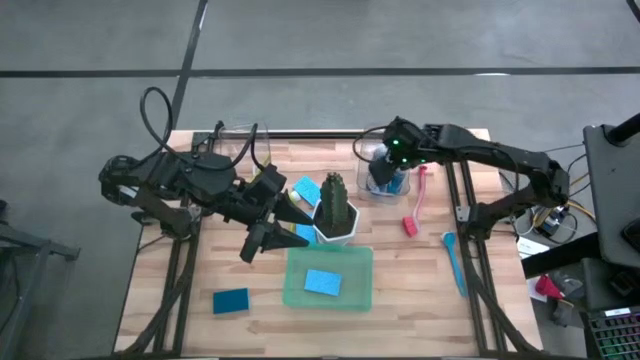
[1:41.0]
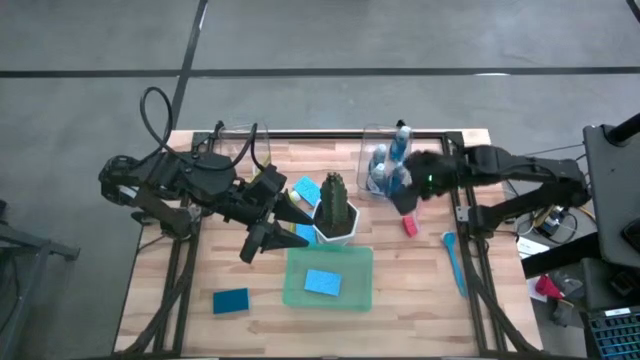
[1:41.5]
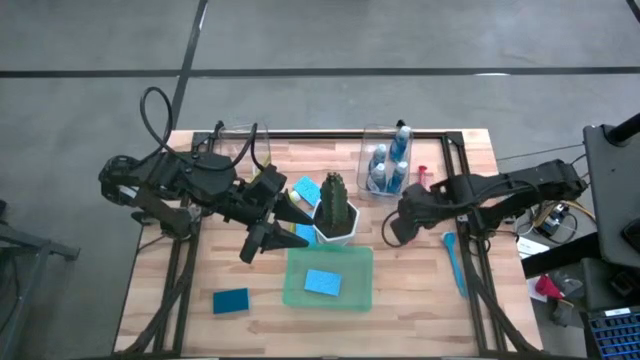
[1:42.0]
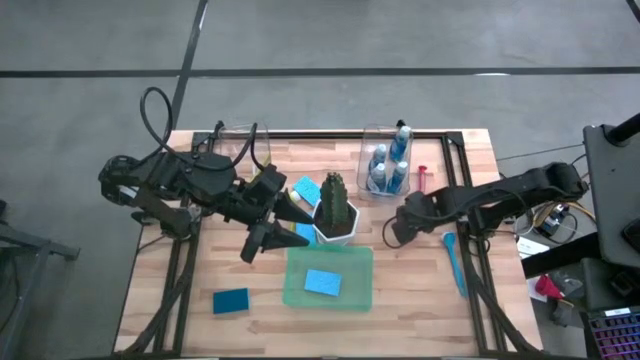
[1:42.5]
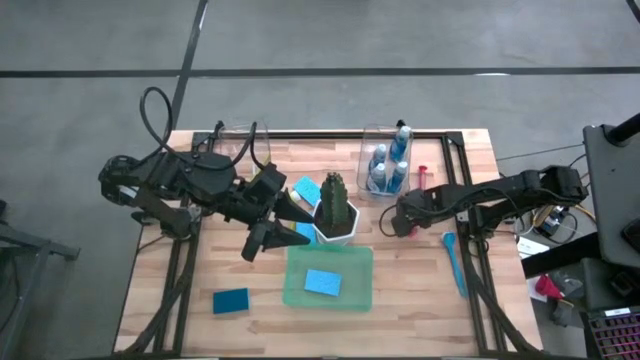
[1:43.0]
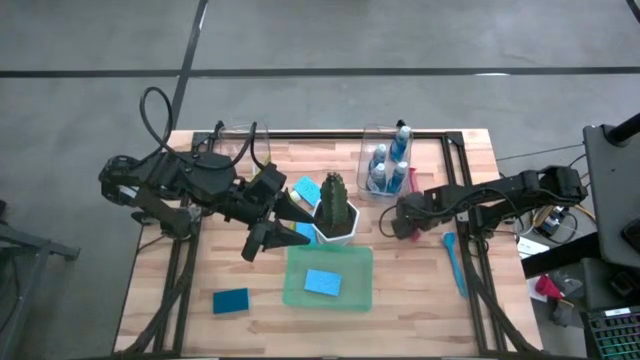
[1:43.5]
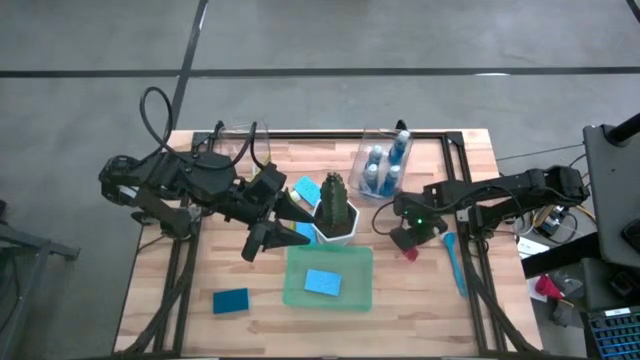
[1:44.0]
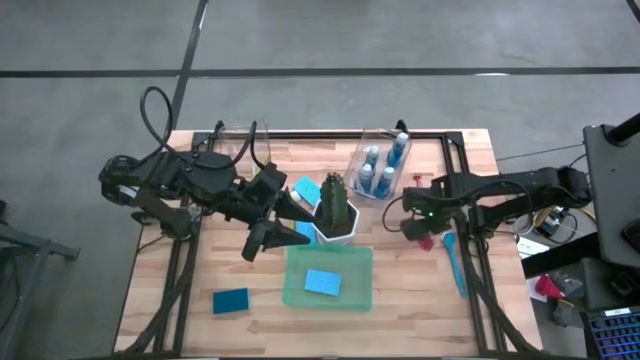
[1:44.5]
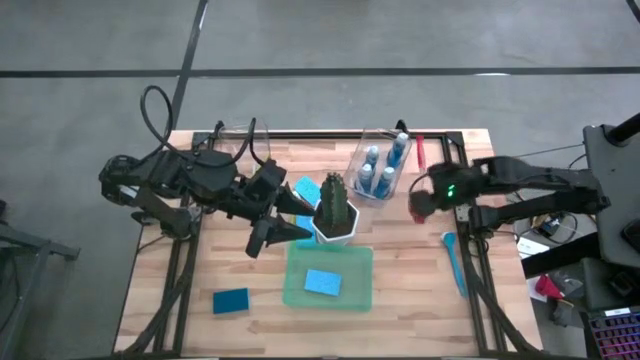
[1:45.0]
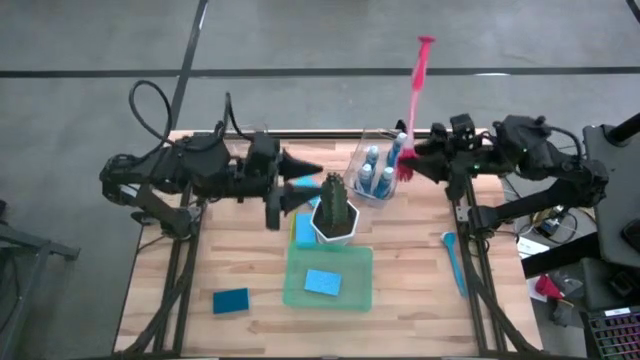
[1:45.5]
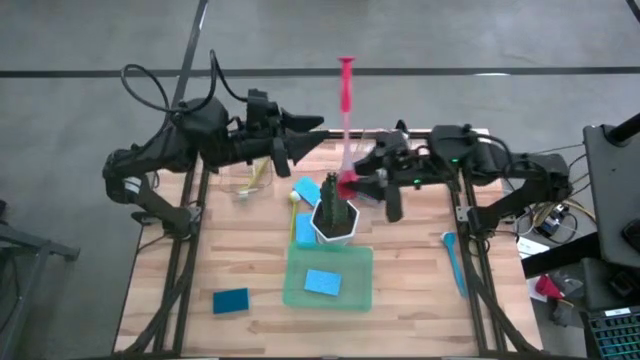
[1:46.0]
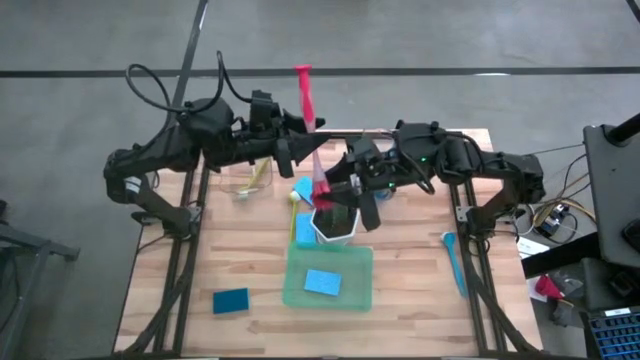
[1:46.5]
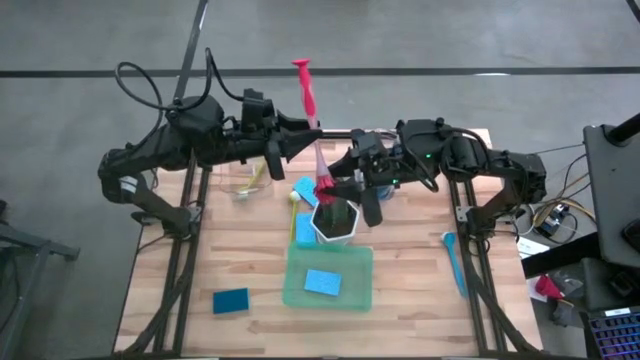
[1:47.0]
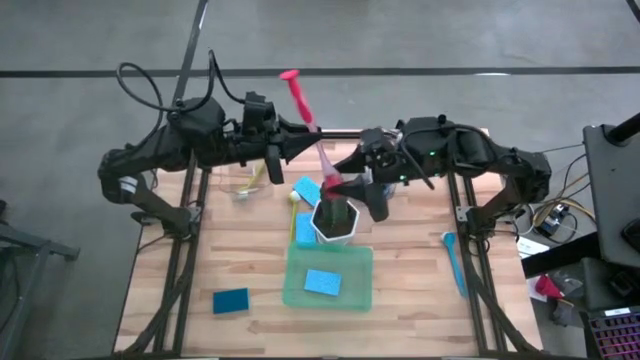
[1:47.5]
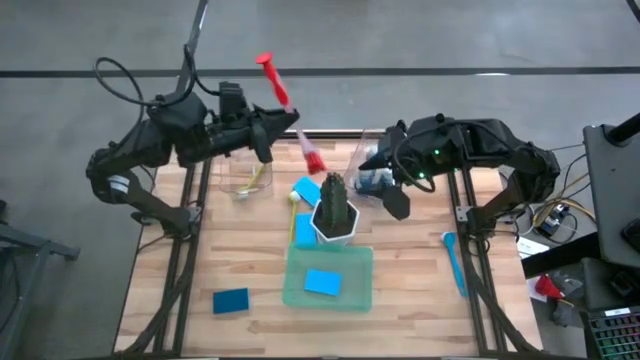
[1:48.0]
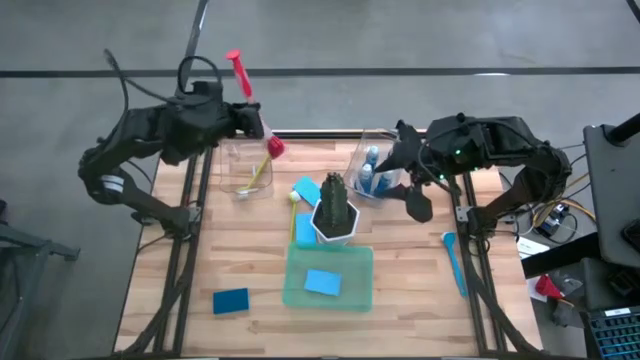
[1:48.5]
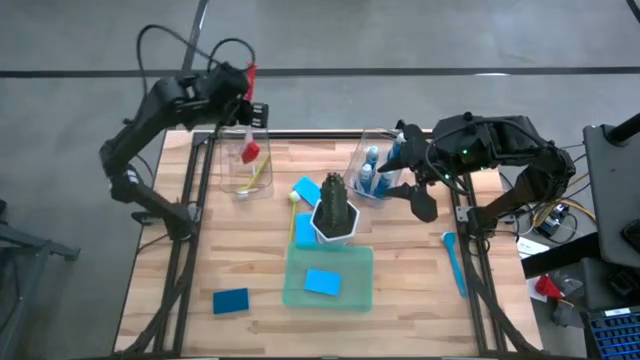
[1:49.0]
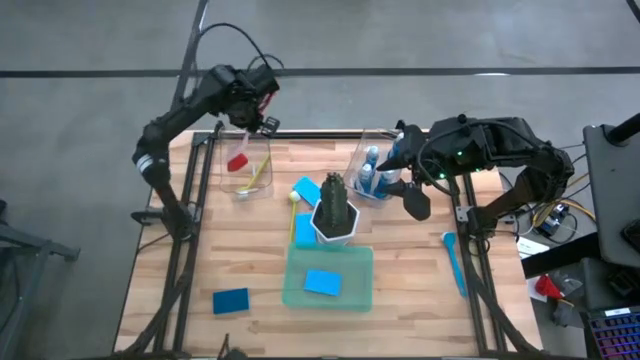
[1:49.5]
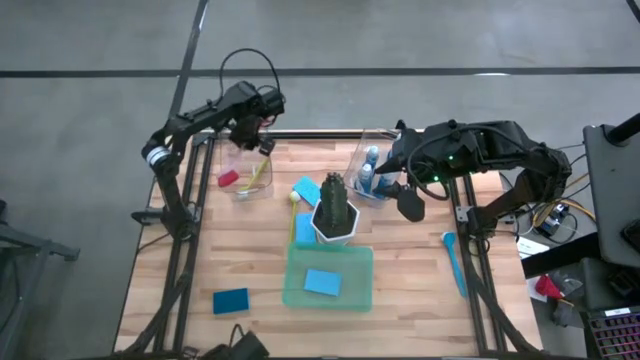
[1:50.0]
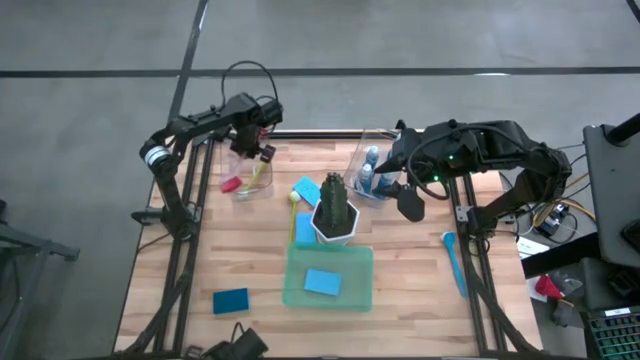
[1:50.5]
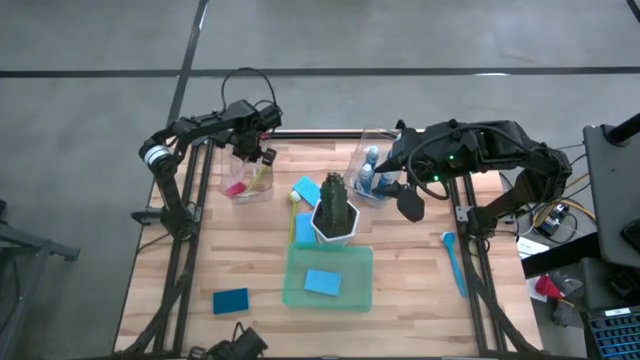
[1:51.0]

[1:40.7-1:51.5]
Task: Pick & Place Kitchen Sink Supplies
Put the pink dish brush into the left transparent bin

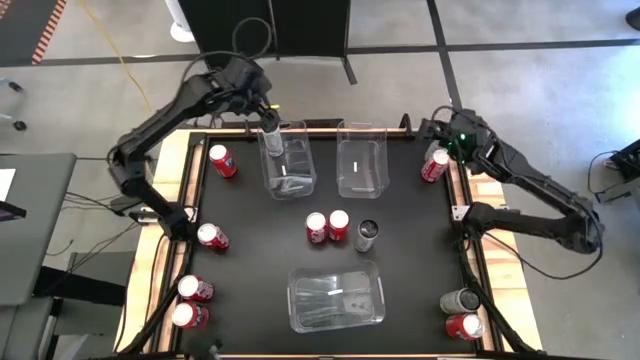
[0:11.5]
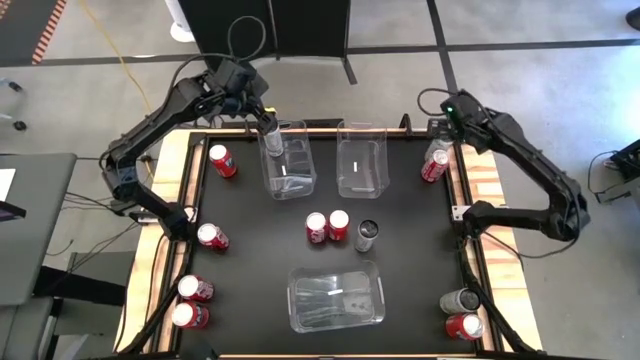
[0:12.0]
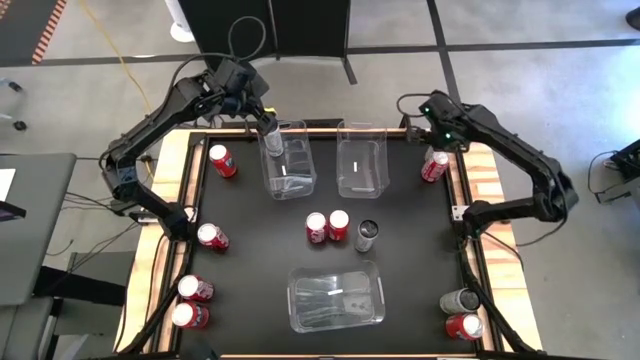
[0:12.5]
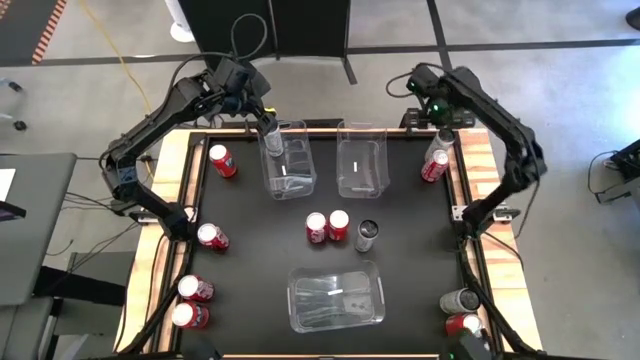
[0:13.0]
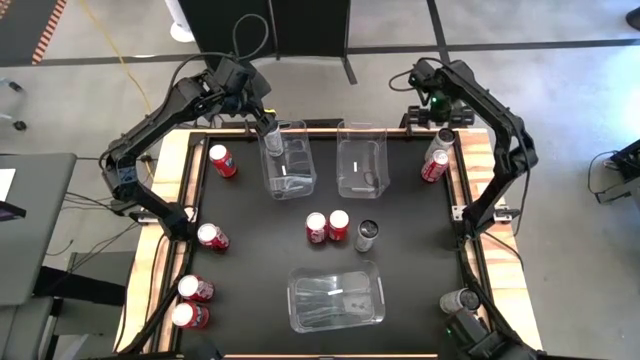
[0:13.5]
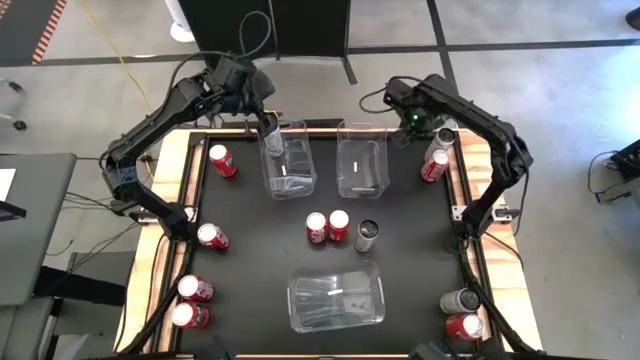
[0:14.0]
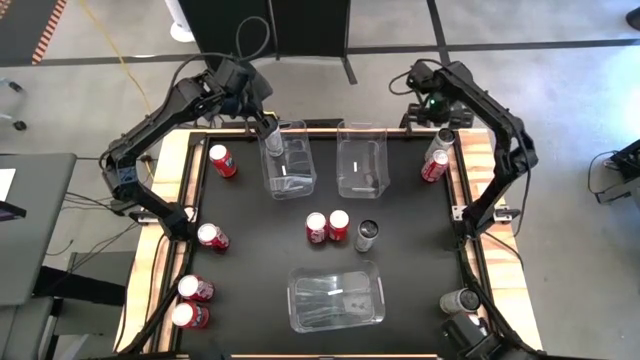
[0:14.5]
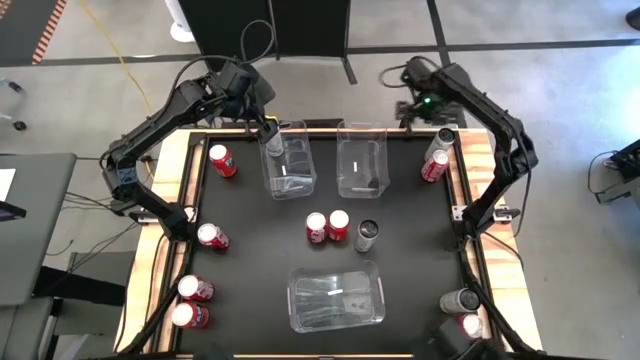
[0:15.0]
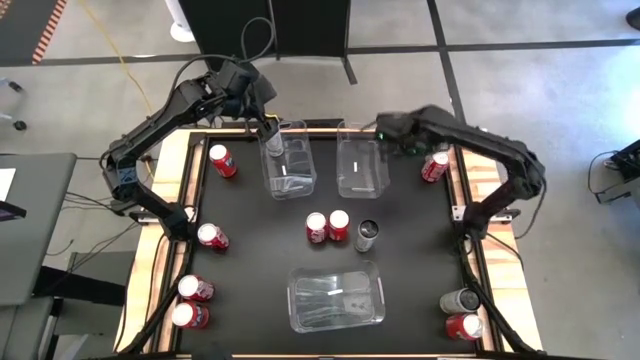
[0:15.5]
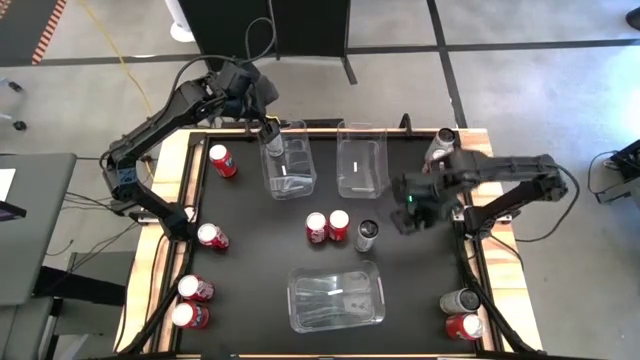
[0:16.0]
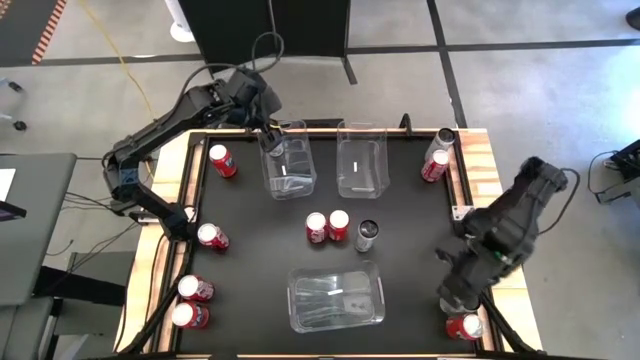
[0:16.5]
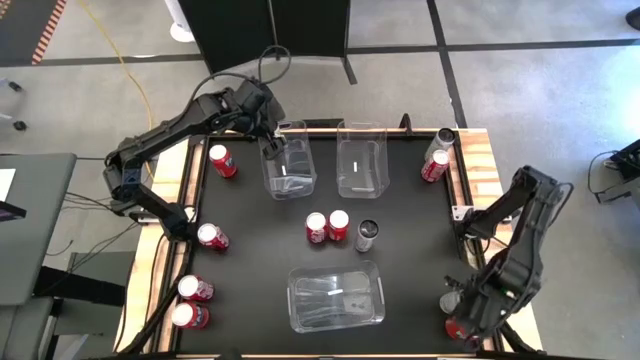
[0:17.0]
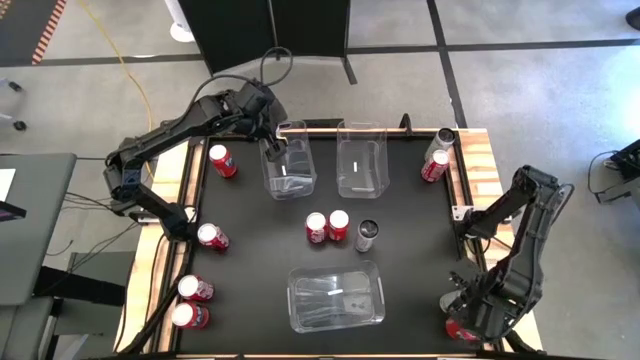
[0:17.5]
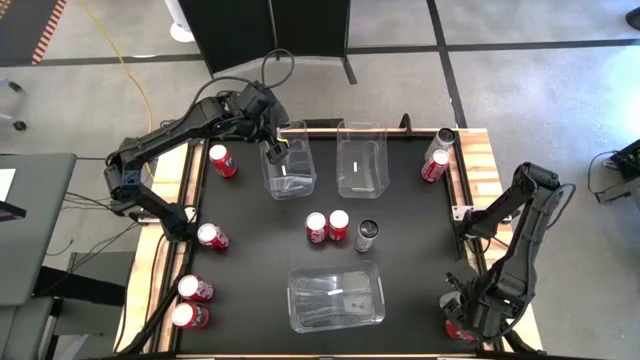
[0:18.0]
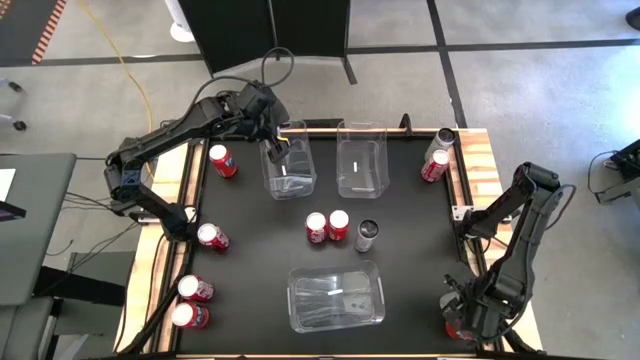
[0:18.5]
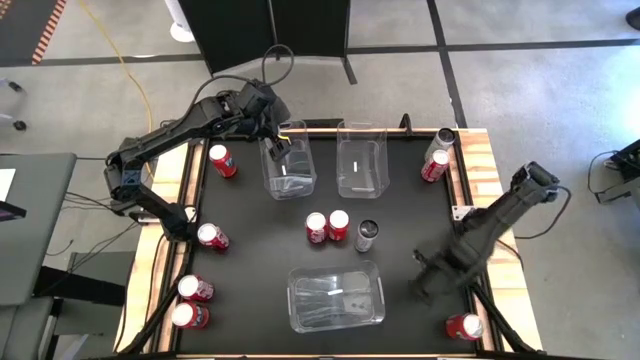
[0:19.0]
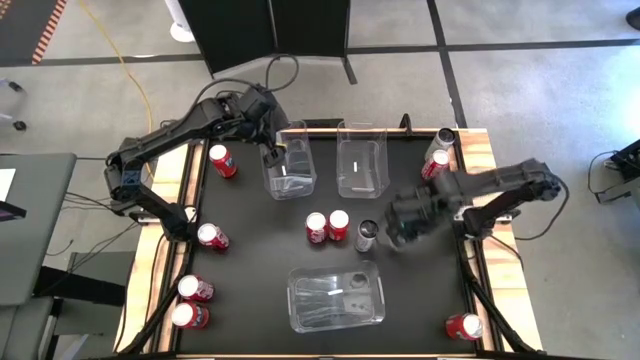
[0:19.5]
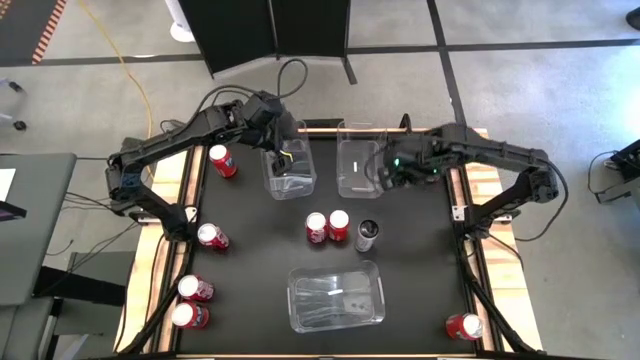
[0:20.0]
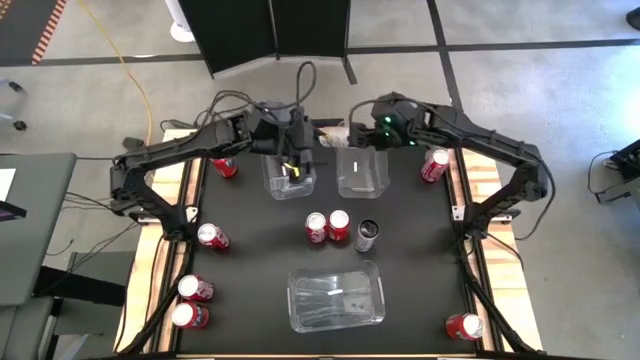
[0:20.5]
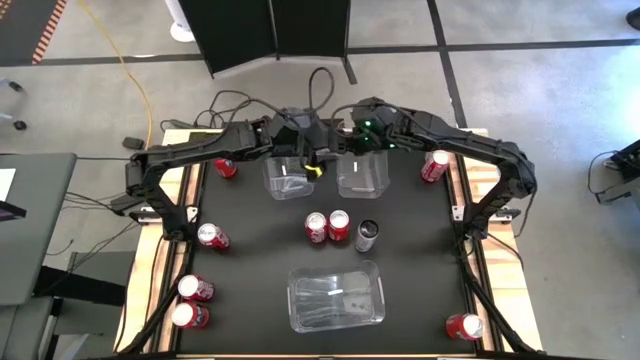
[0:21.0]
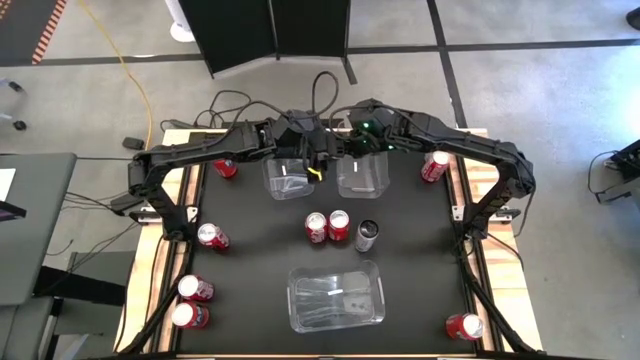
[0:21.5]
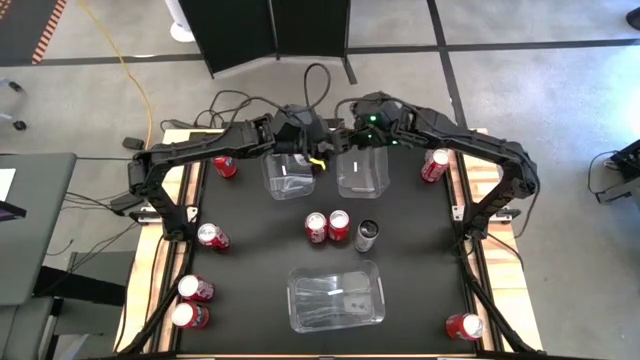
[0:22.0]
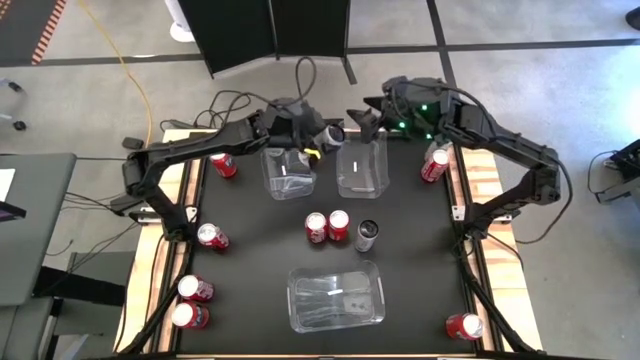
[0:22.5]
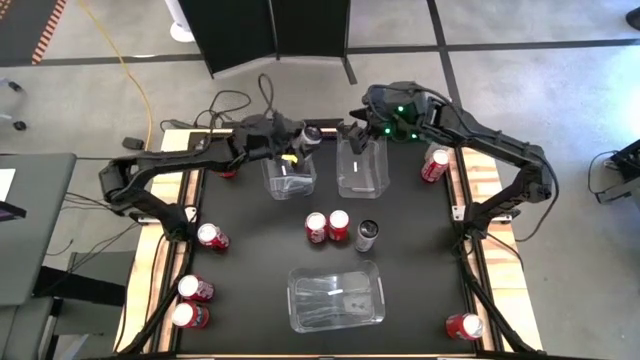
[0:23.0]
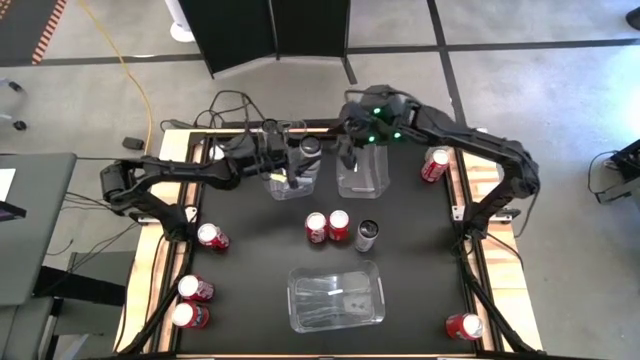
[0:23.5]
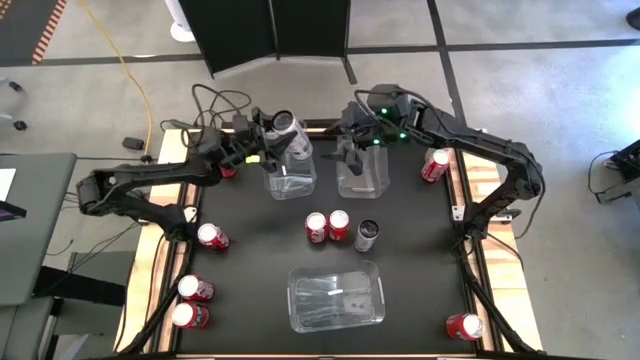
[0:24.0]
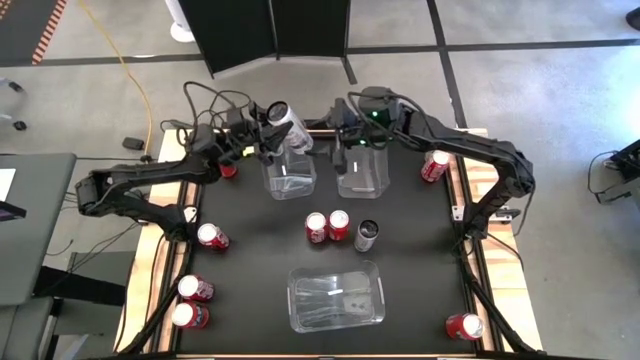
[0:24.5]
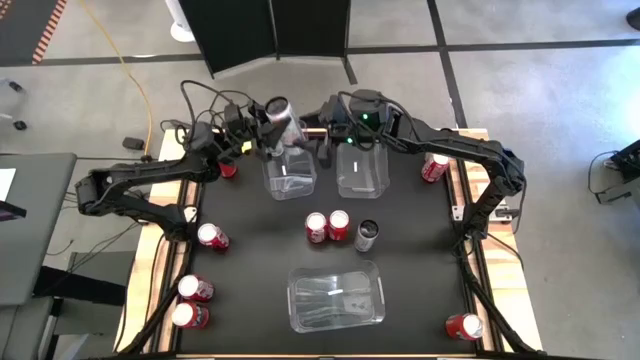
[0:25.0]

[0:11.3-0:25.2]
Task: Sort soda cans
Put the bottom white soda can into the top left transparent bin
